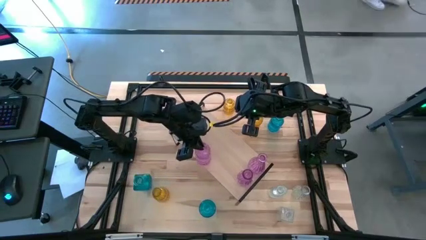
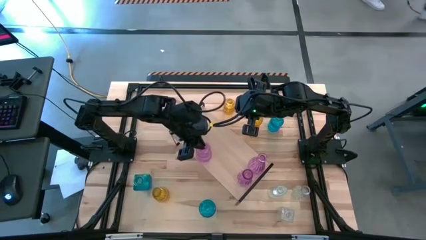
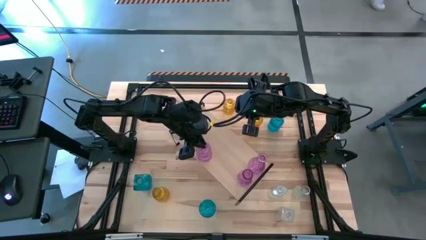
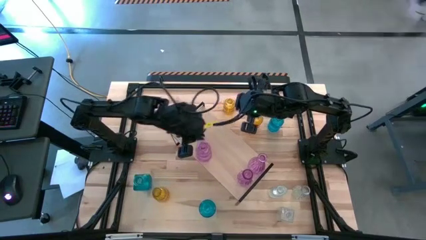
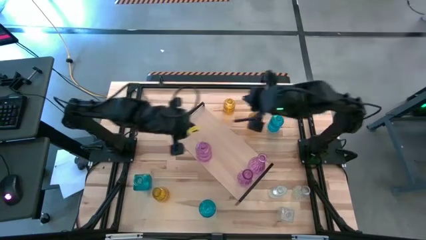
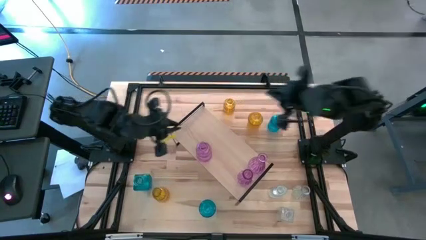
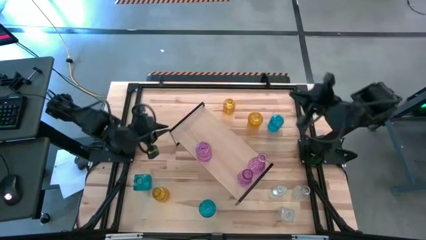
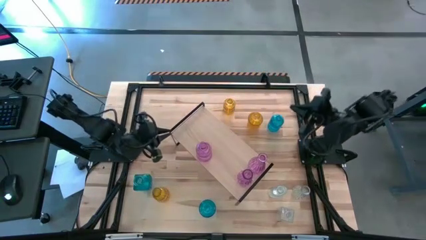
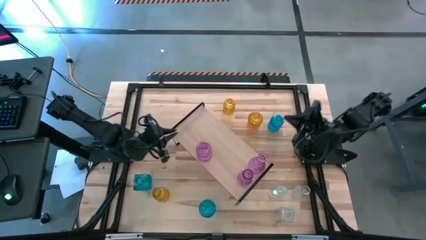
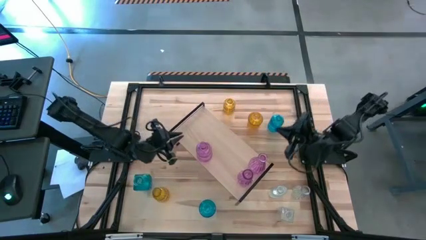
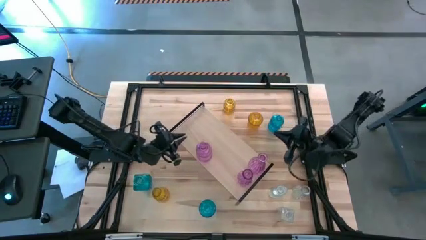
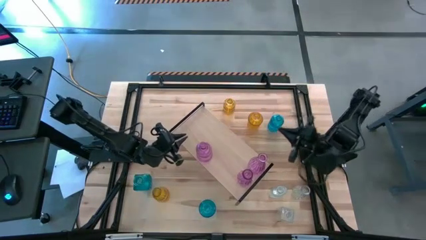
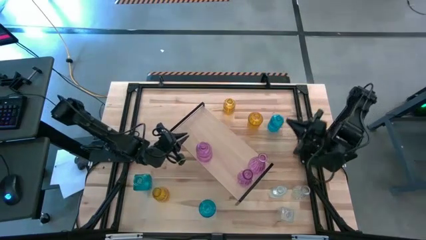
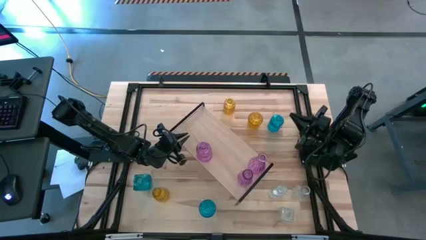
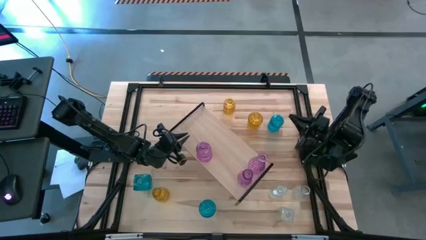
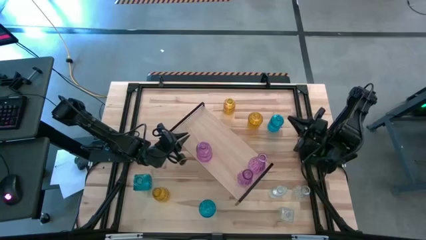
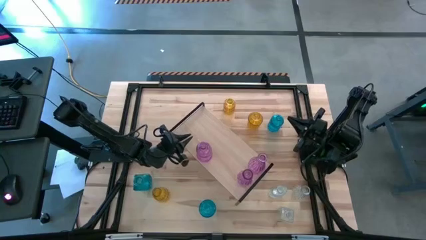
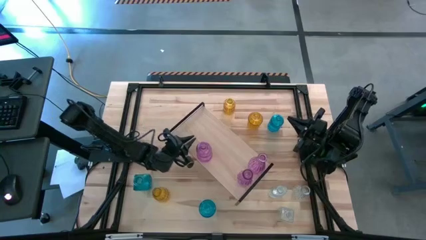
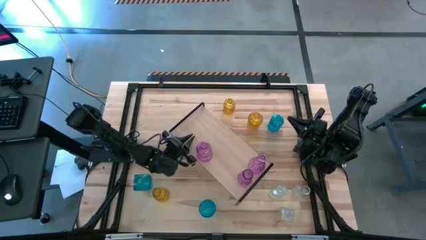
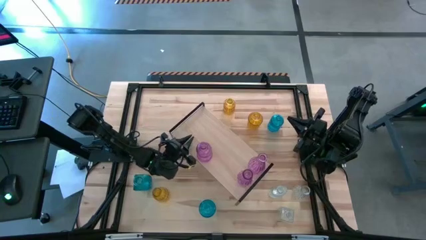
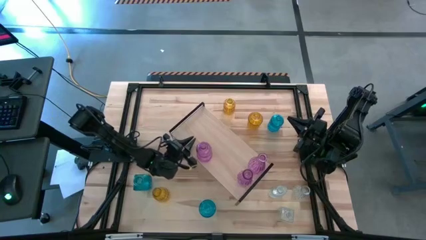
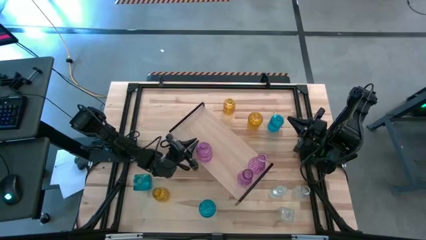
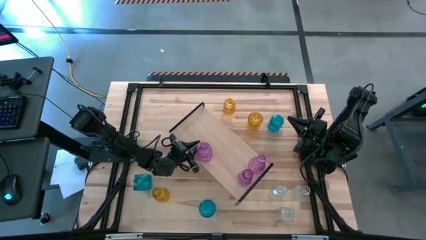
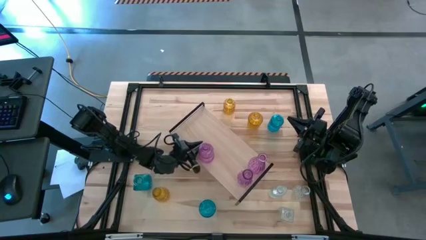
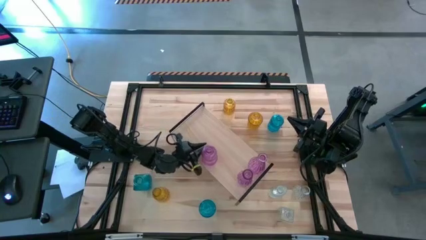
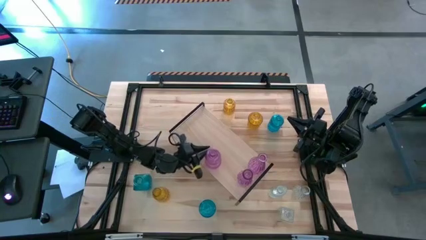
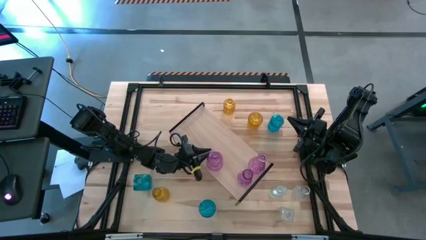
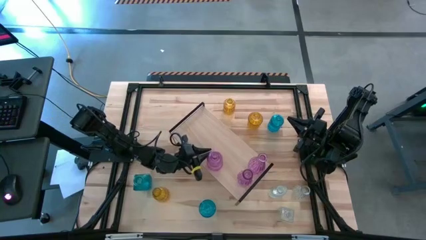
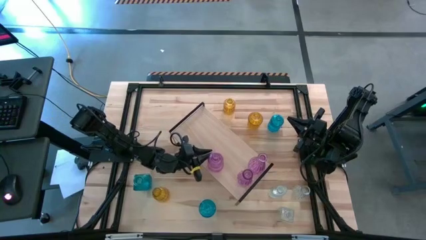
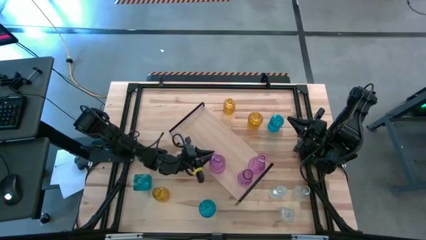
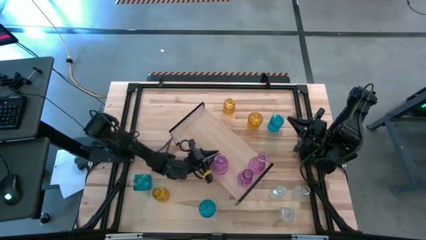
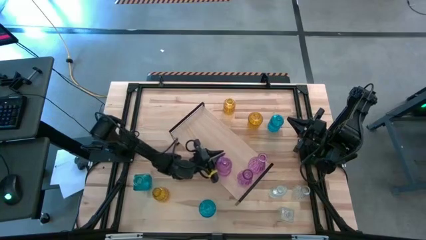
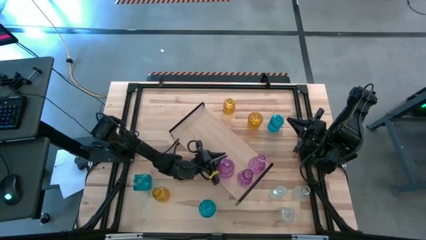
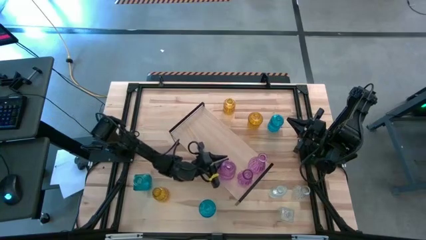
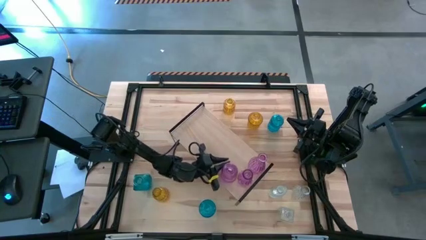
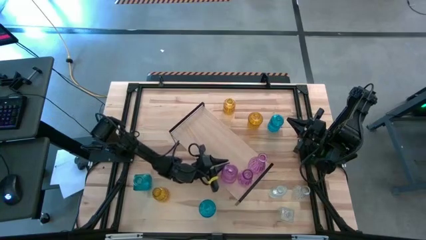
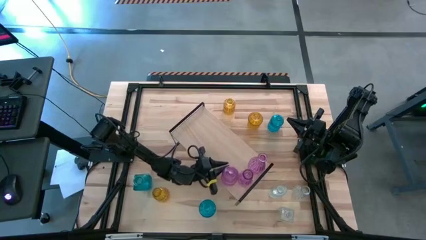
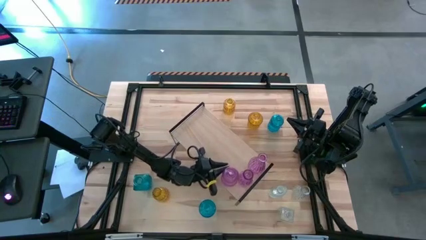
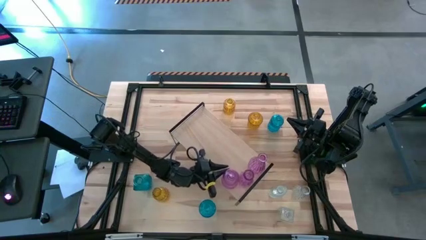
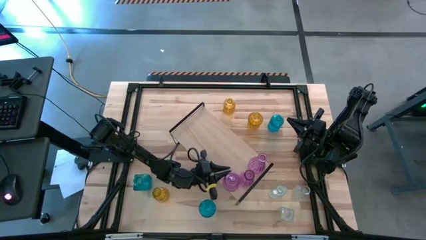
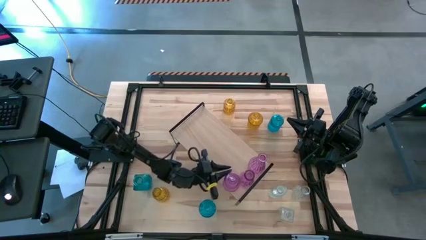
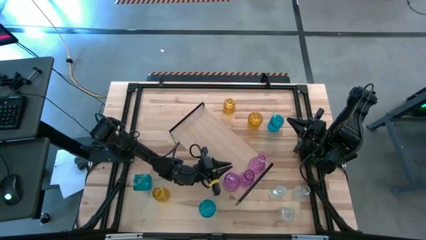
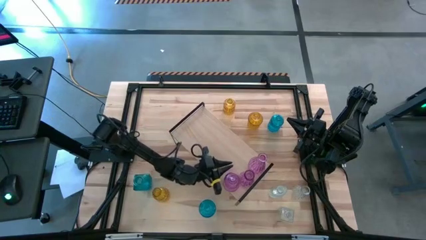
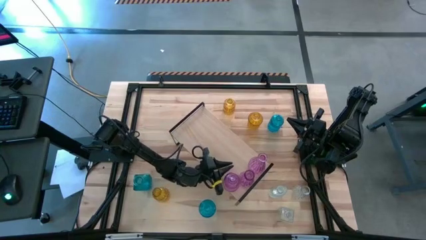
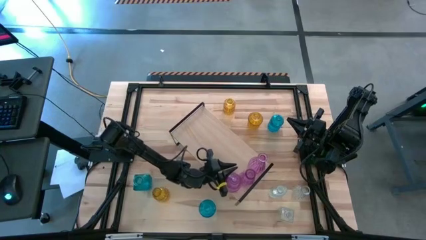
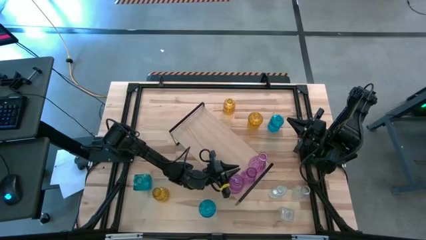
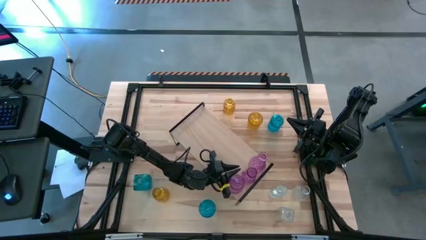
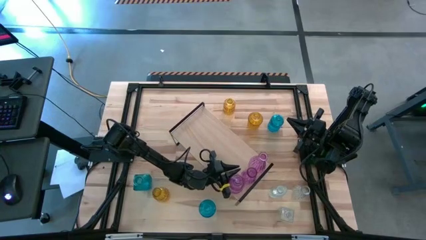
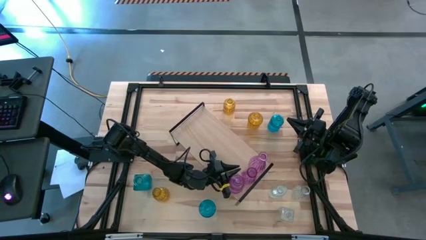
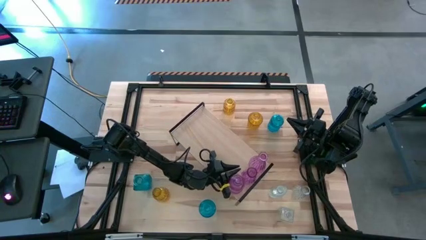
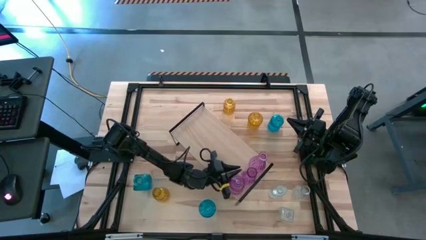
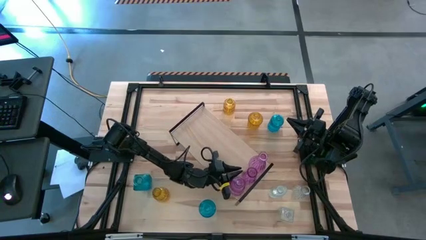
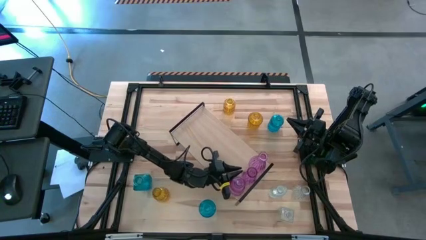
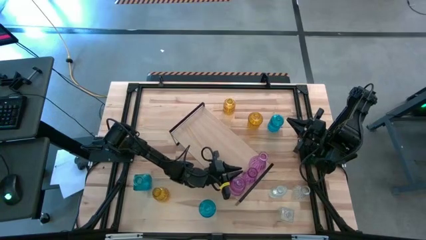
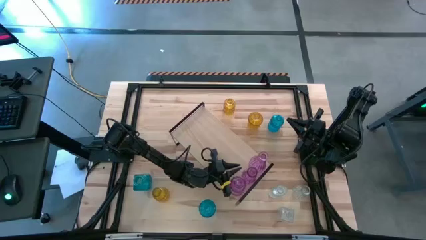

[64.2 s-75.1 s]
Task: sort vases onto shelf
Put the pink flower vase on the shelf aligned with the other pink flower vases

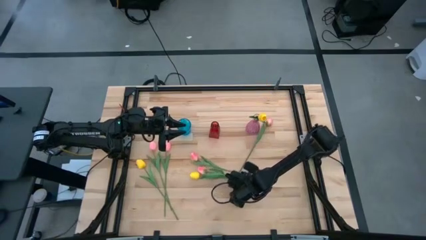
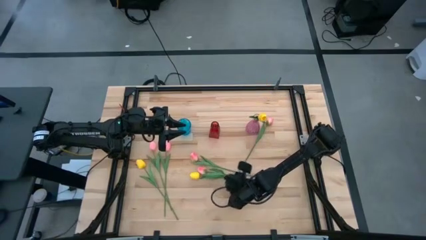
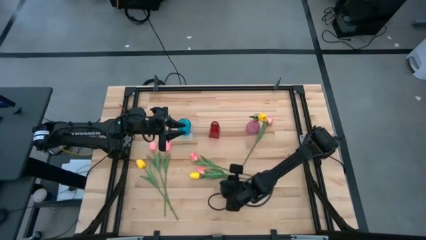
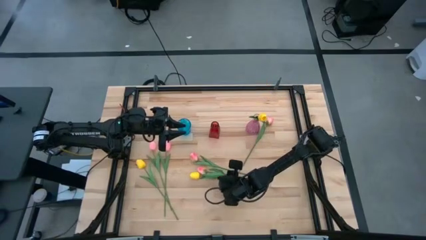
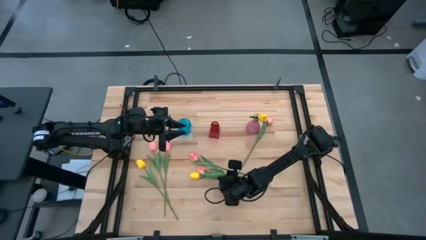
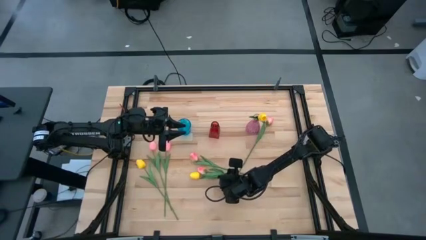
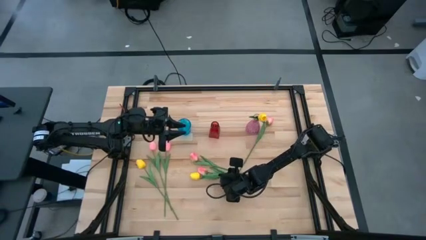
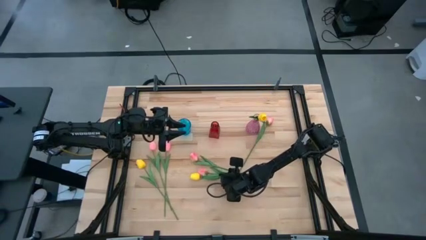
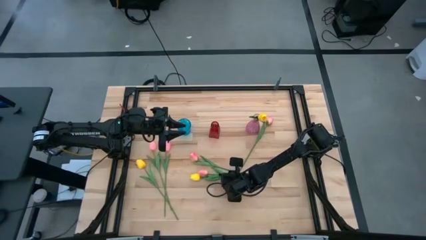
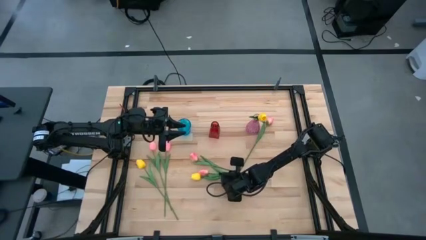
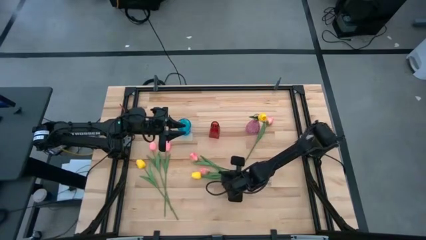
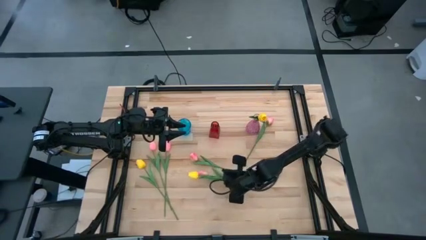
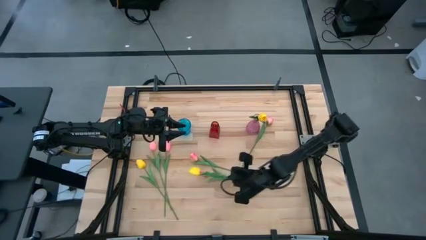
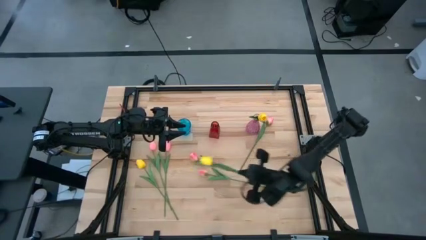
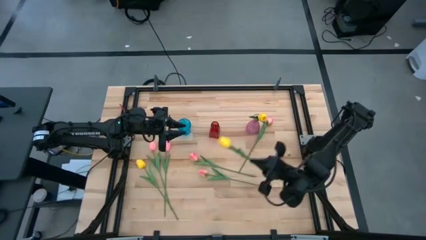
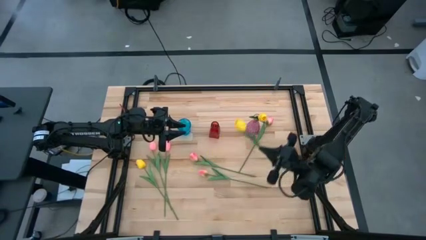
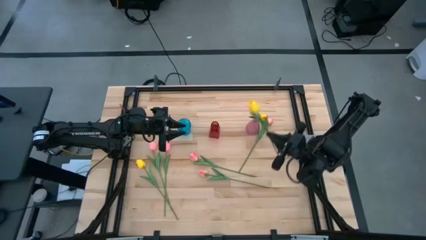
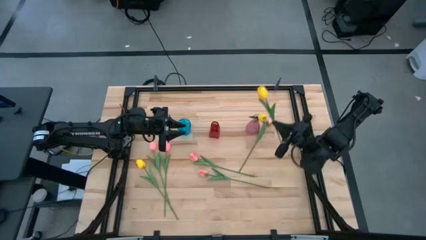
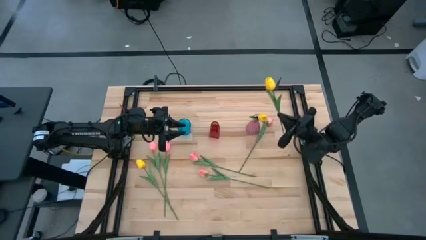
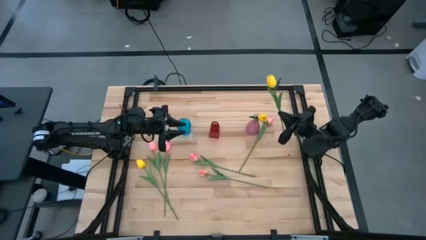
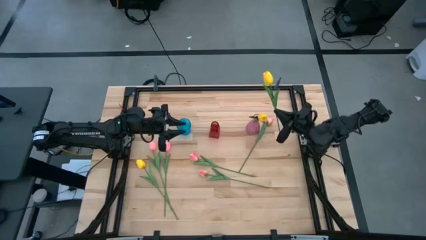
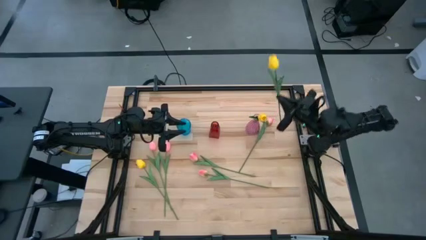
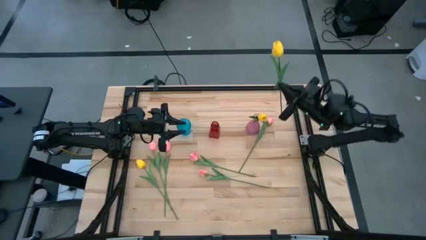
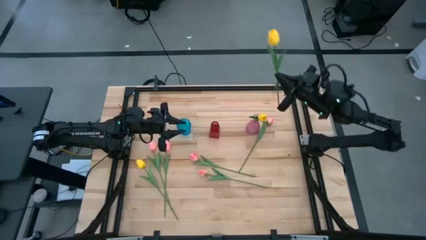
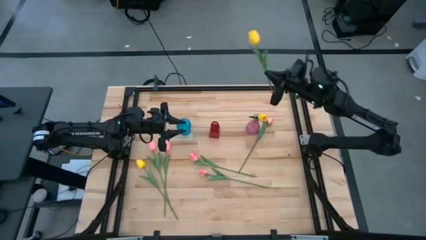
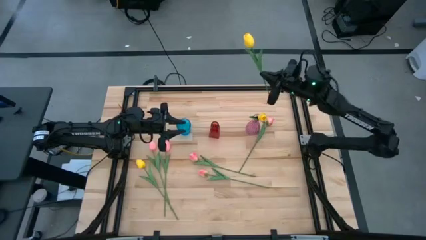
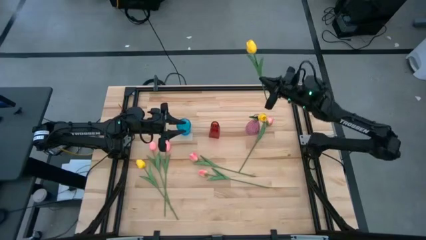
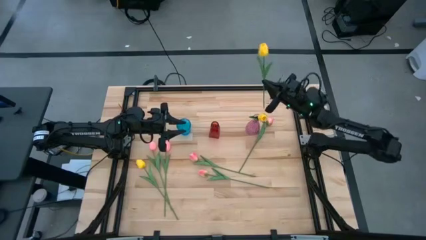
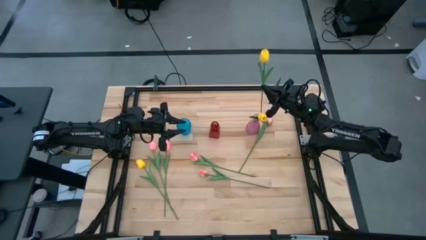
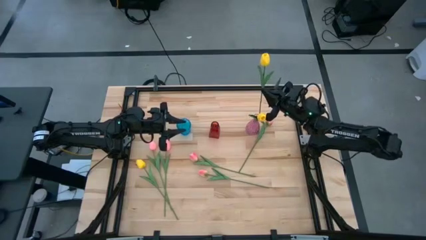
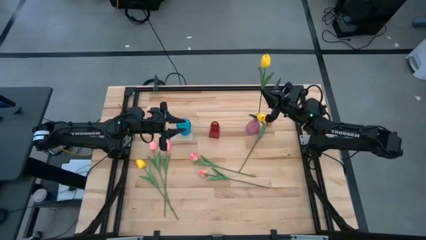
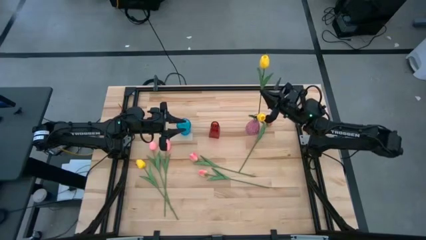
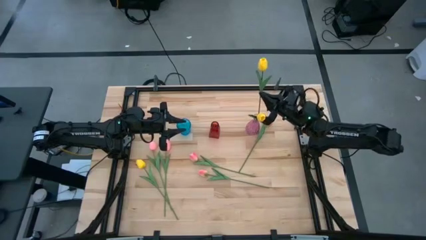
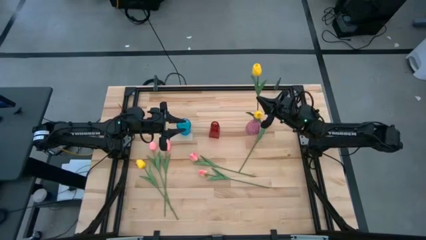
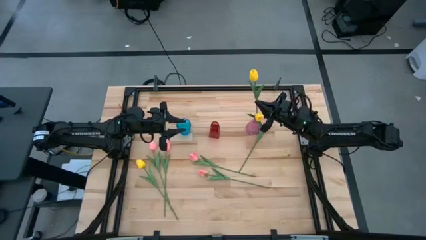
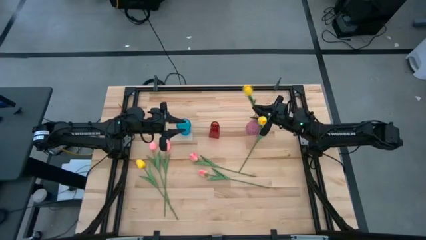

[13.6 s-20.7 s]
Task: Sort flowers into vase by color
Put the right yellow flower into the pink vase
